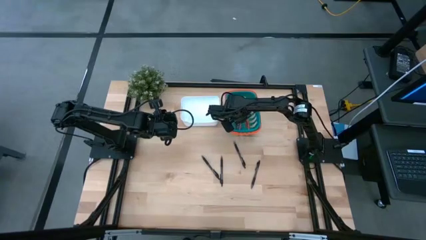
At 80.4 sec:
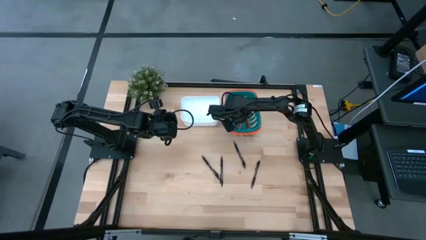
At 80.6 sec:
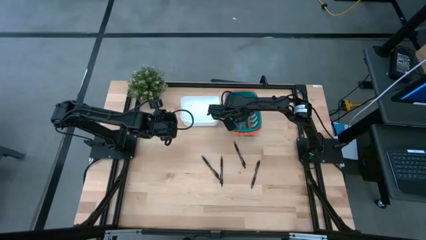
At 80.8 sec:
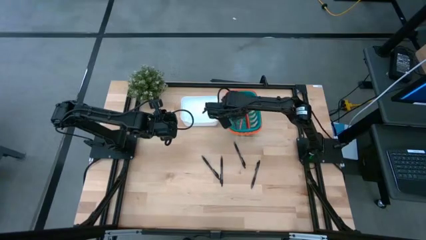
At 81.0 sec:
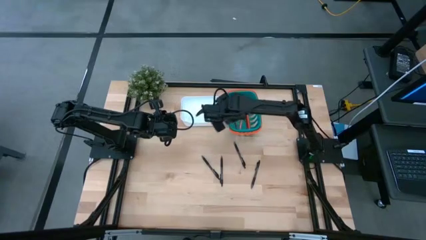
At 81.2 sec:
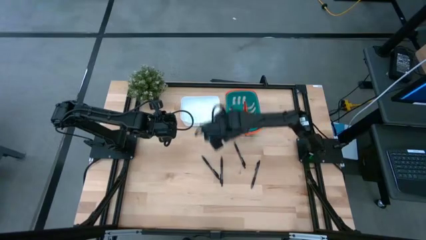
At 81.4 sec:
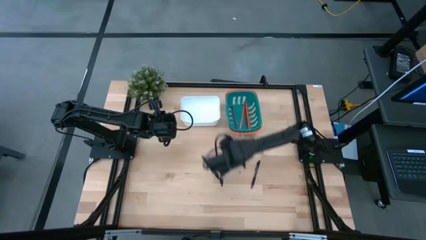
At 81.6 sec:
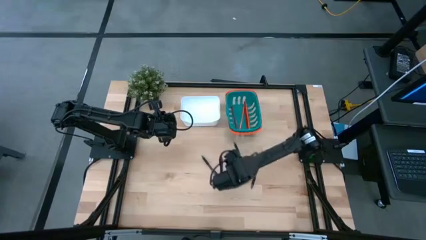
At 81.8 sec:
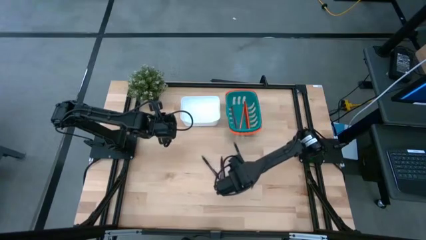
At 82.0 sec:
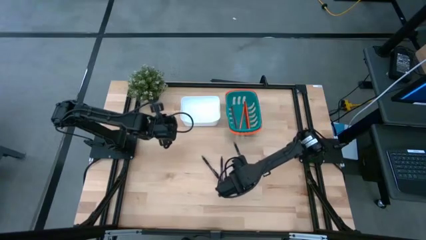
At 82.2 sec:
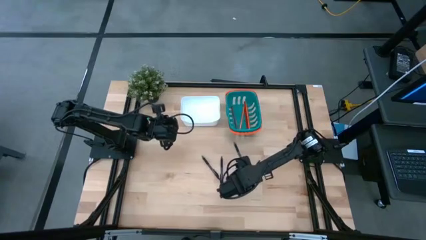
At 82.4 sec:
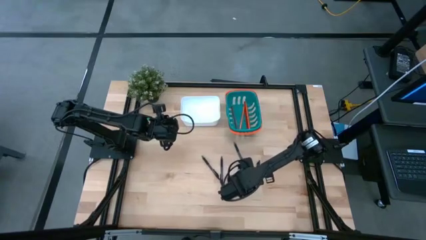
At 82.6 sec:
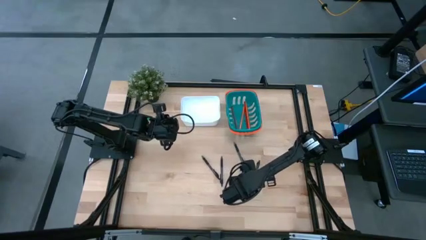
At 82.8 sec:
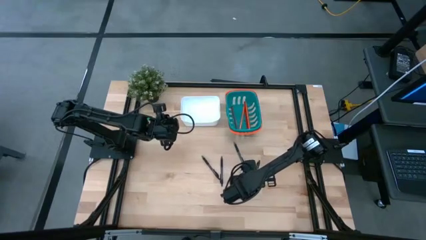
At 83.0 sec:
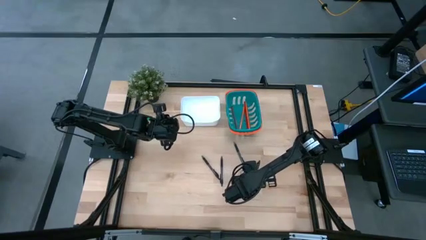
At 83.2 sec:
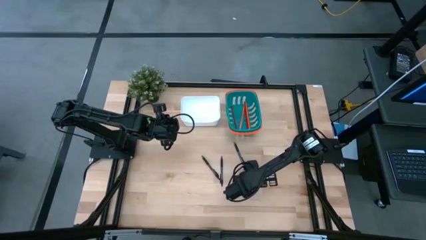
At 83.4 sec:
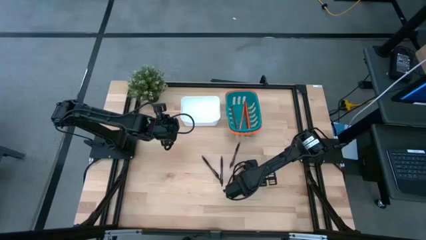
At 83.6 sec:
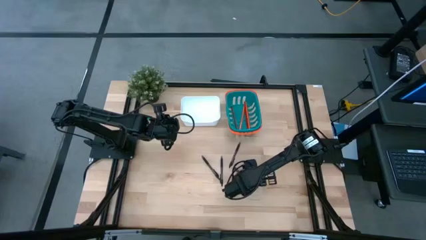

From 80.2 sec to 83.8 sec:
Task: Sort pens & pencils
Put the right black ballpen into the white bin

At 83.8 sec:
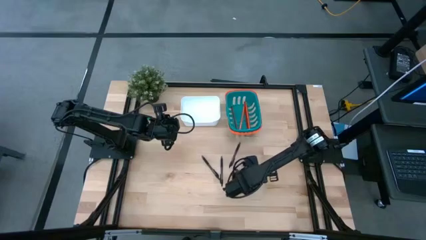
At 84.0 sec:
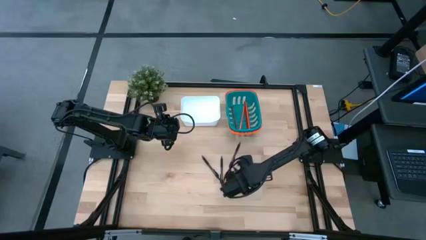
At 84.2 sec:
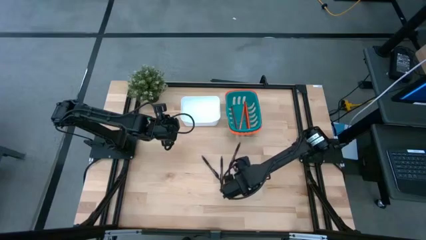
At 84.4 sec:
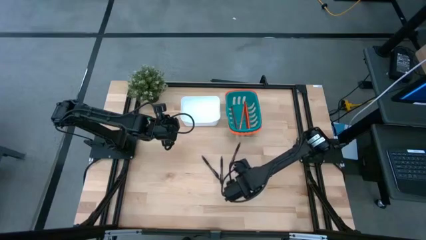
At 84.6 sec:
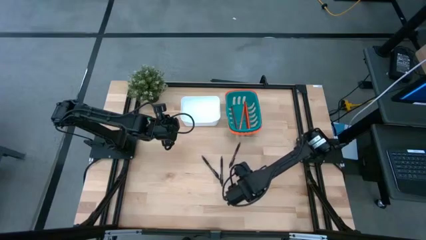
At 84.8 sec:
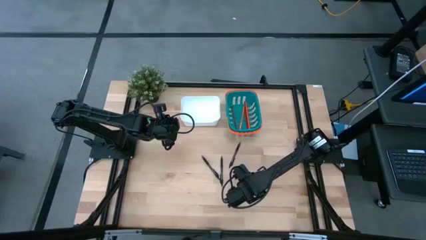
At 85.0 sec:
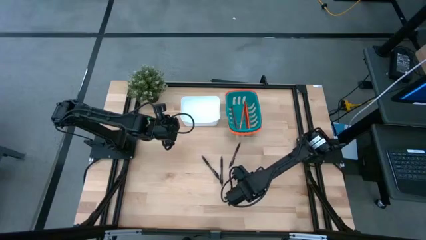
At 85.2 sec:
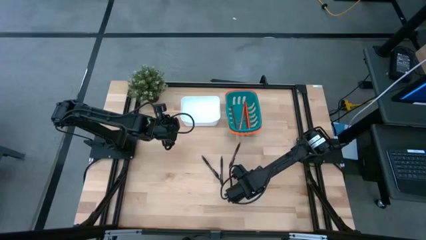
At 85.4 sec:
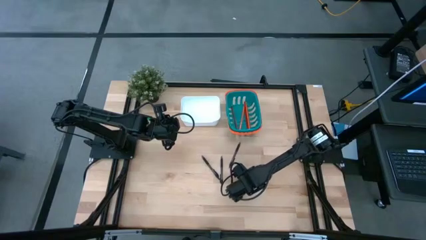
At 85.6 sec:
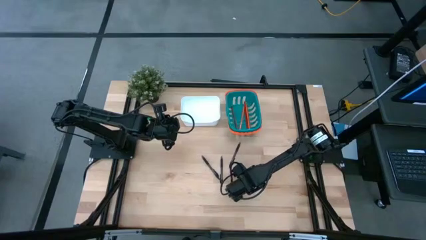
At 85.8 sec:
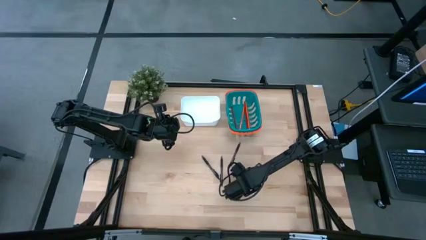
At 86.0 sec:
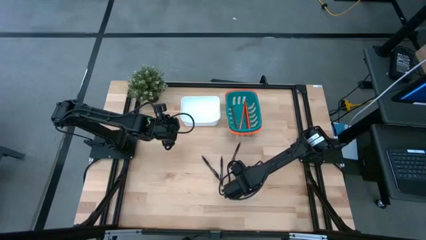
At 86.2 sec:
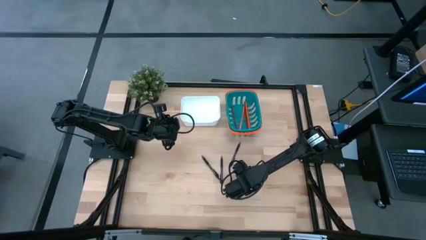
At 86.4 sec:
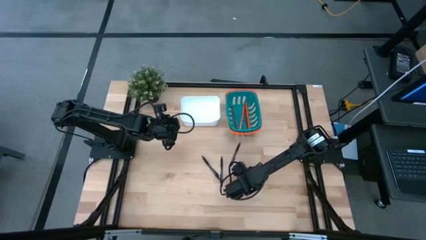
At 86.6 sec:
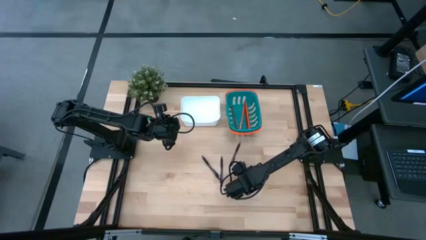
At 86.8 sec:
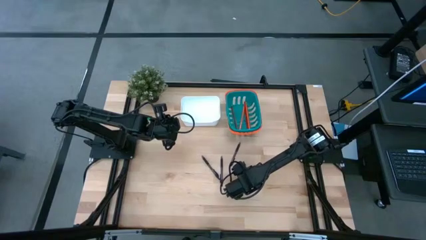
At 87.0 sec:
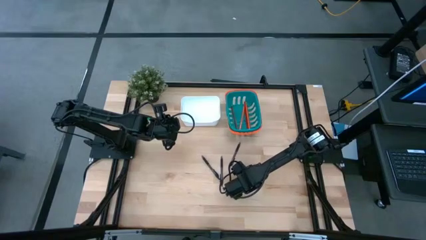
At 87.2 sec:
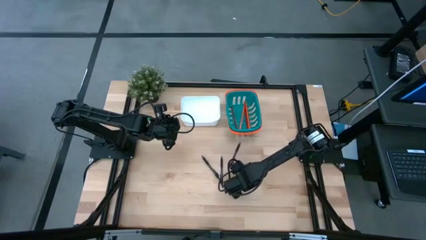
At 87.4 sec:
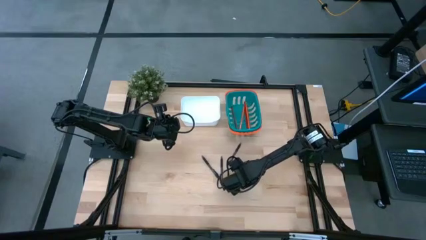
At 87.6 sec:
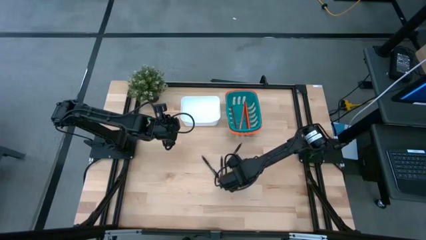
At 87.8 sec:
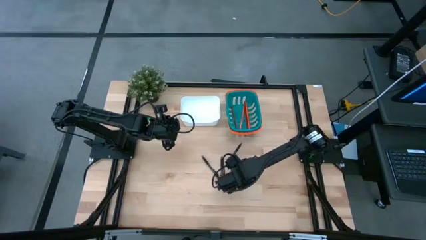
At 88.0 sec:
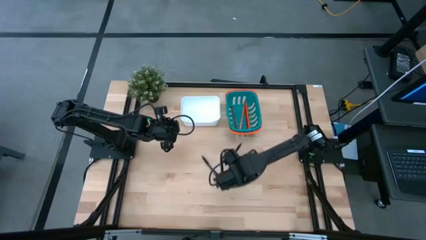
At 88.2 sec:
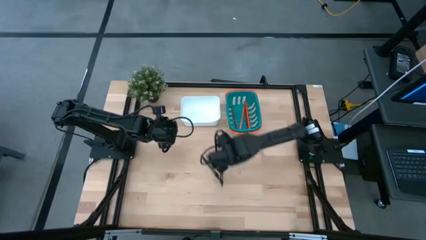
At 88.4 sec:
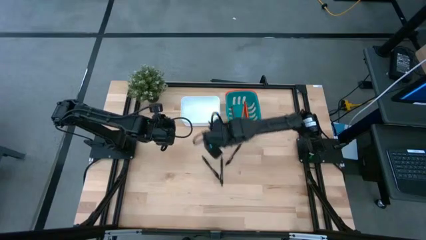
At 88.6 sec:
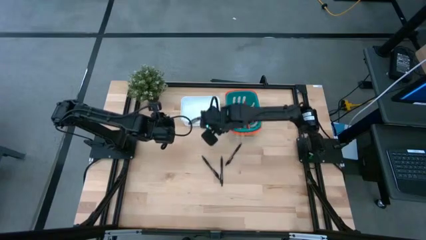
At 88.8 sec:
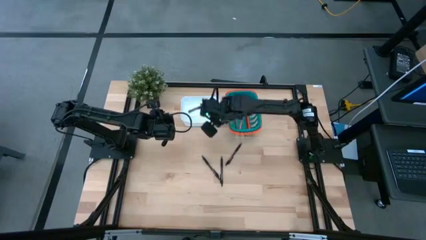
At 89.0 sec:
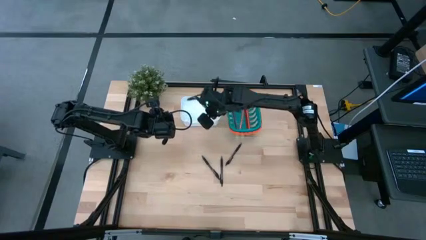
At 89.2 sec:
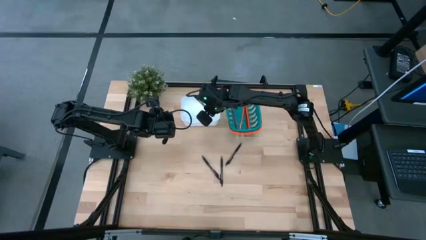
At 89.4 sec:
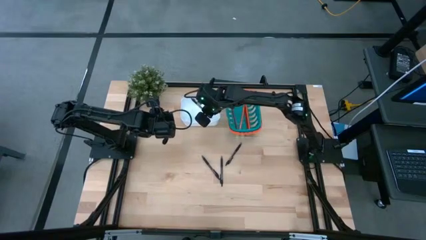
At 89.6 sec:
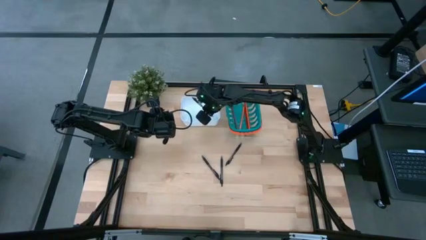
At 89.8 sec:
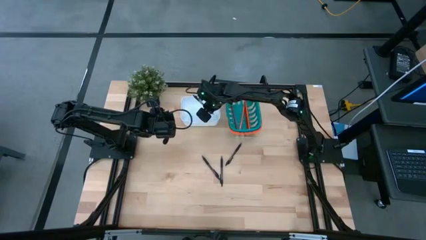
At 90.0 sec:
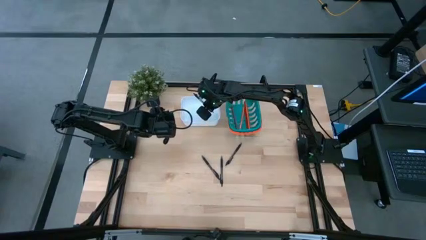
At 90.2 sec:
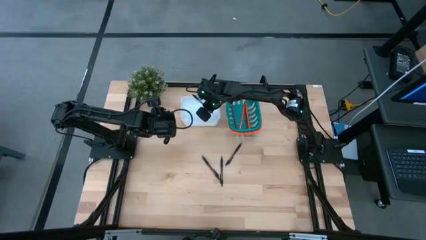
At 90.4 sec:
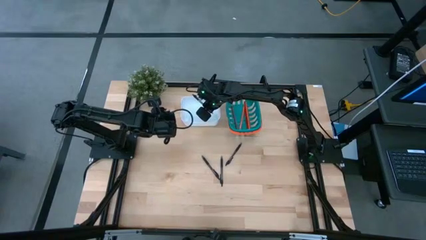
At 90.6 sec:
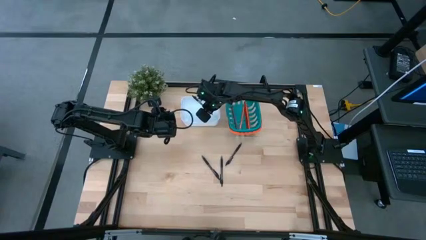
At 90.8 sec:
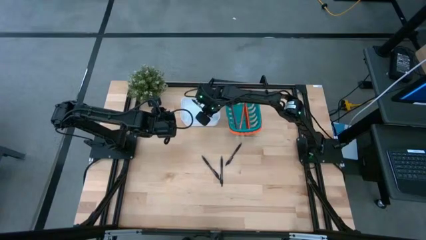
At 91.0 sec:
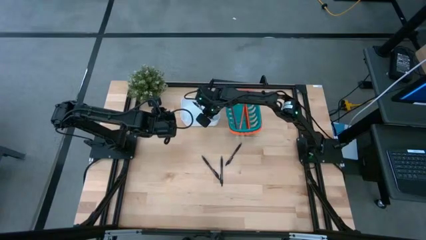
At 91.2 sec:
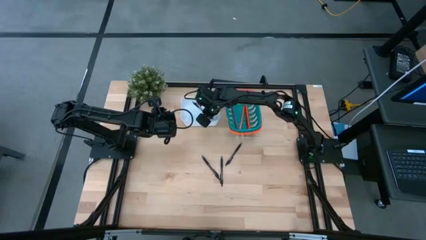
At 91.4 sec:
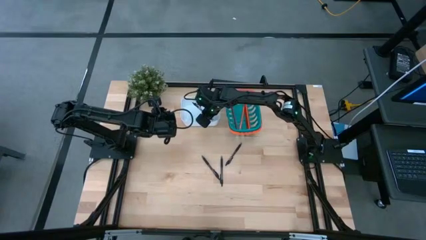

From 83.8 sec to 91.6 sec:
Put the right black ballpen into the white bin

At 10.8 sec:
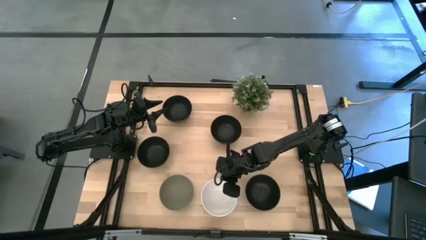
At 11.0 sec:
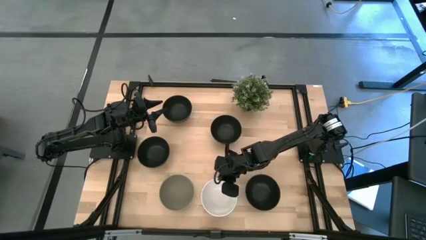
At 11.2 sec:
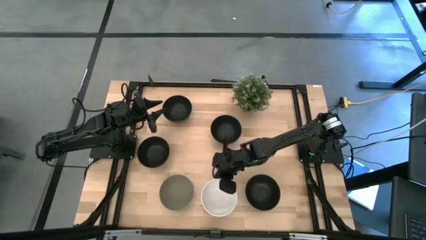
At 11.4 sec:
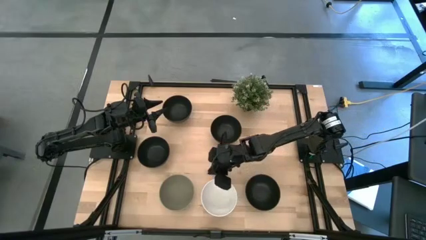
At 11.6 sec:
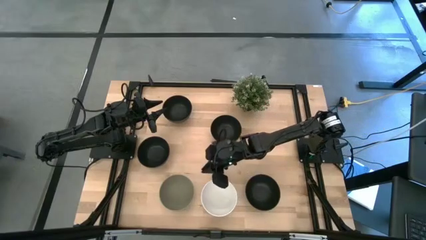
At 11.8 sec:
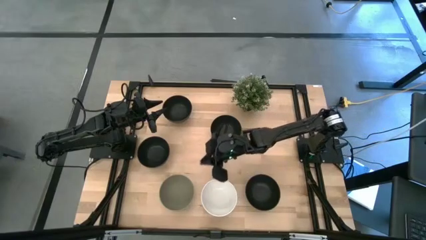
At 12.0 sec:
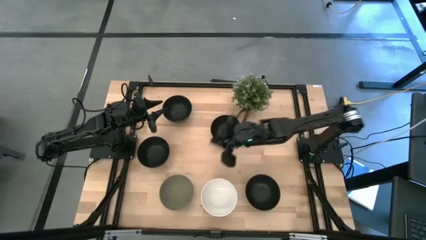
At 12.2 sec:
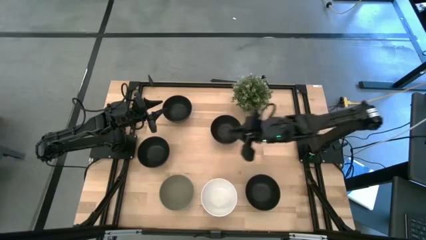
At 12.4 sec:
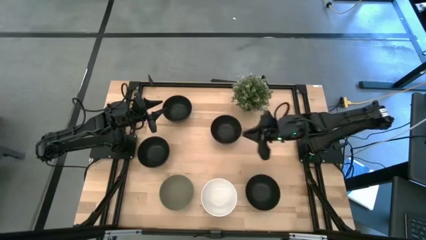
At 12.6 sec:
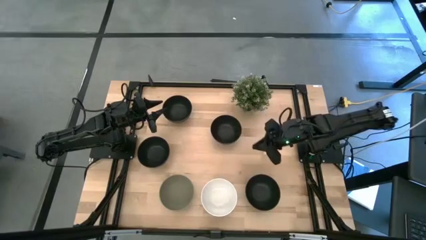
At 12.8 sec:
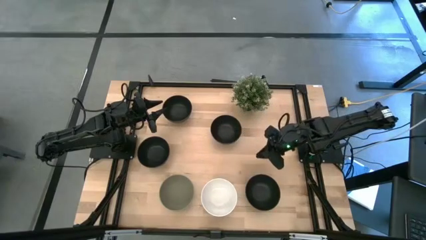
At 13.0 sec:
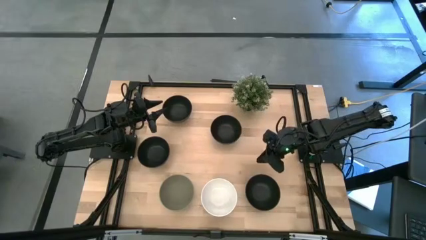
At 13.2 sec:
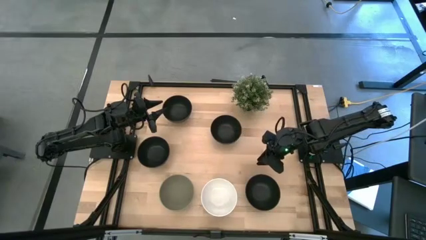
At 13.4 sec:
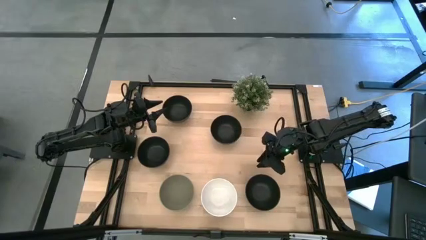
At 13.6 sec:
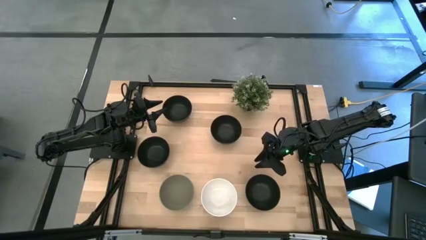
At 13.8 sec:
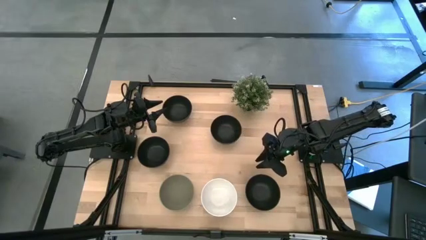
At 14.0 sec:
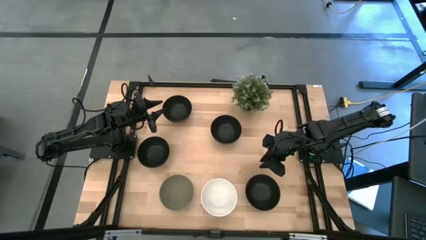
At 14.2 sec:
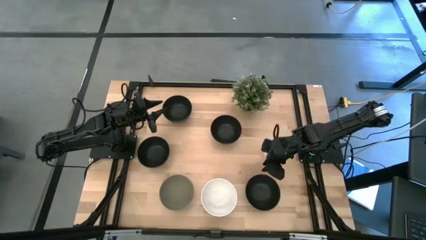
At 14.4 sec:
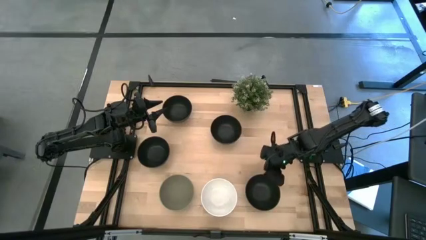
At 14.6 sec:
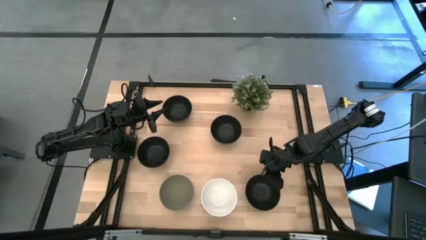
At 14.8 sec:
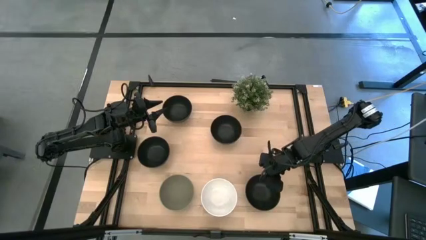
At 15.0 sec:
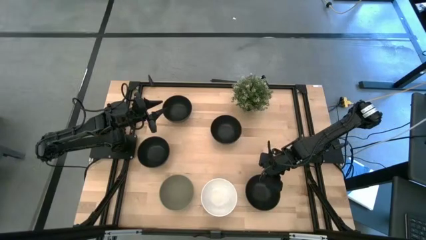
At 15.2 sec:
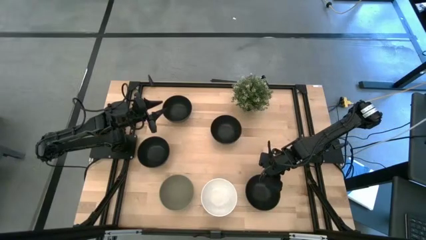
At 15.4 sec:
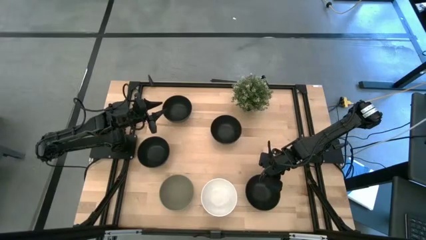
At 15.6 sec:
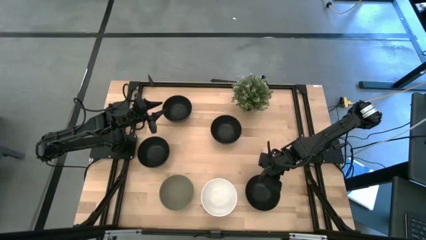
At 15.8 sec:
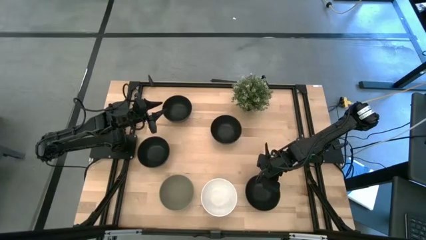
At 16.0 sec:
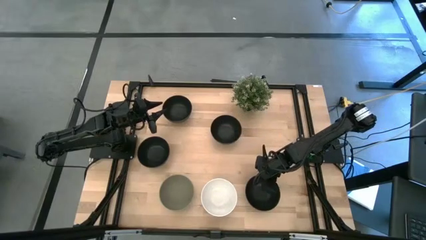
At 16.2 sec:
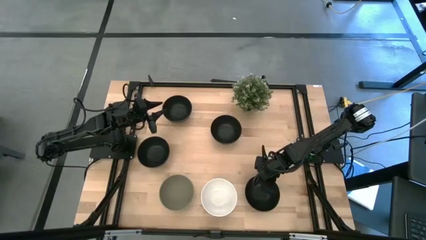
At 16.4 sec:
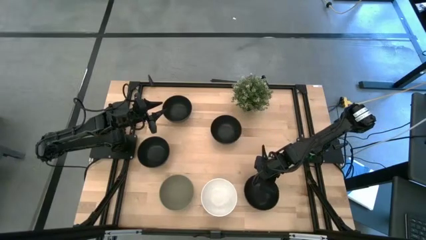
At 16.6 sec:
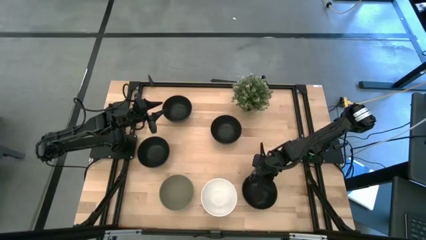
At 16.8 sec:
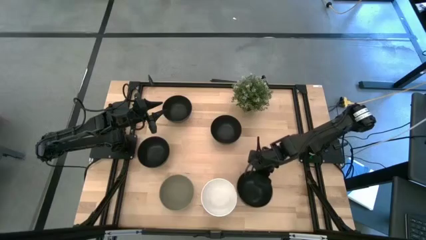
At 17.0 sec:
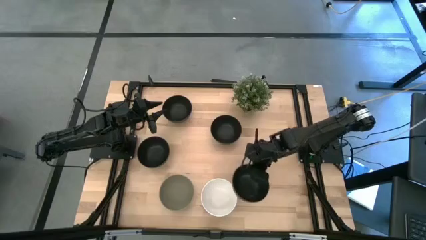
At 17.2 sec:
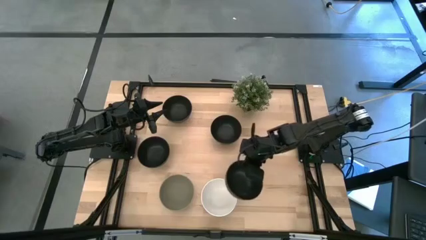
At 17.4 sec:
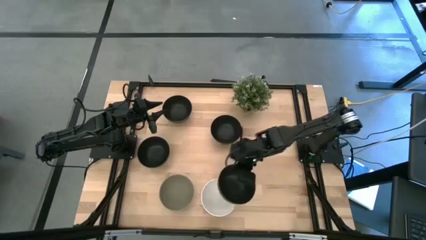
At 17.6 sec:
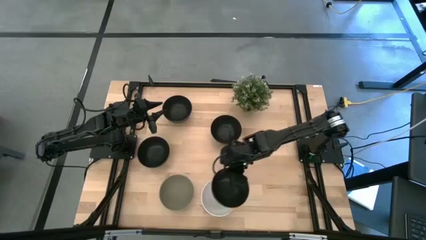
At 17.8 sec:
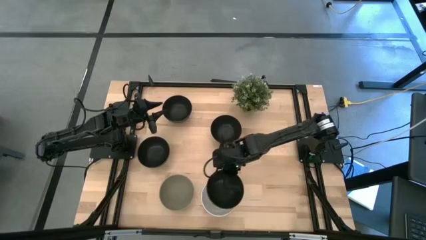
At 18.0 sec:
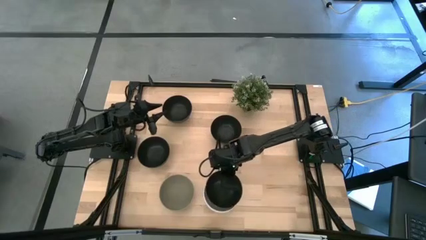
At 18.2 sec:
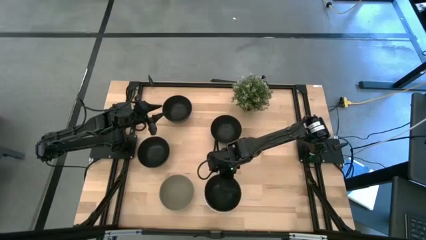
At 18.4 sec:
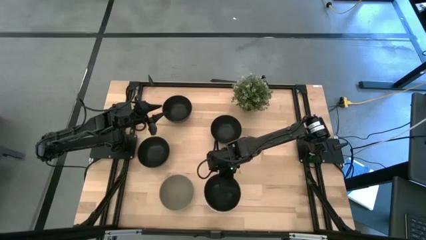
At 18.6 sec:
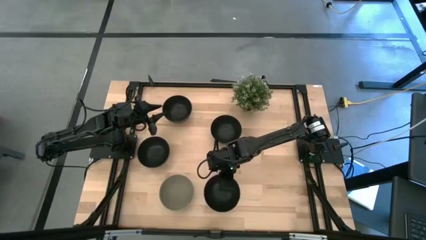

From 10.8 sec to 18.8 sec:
Task: Nest bowls inside each other
Stack the black bowl on top of the white bowl
